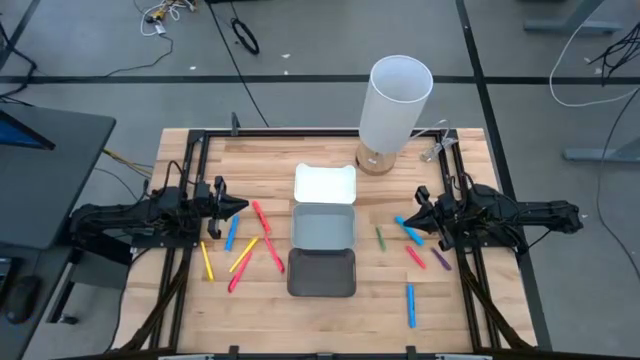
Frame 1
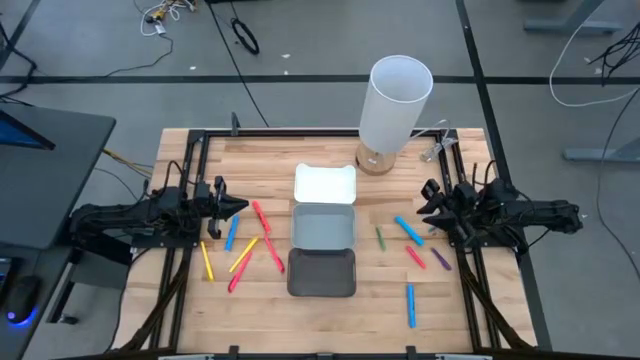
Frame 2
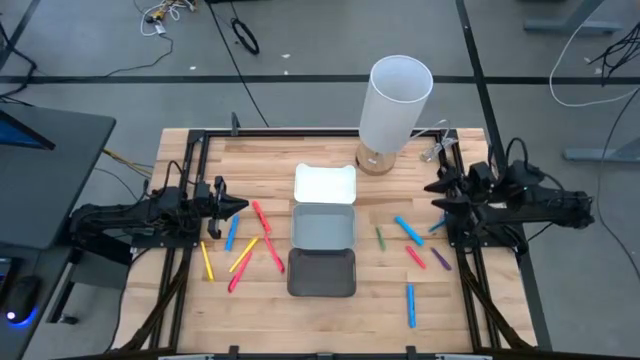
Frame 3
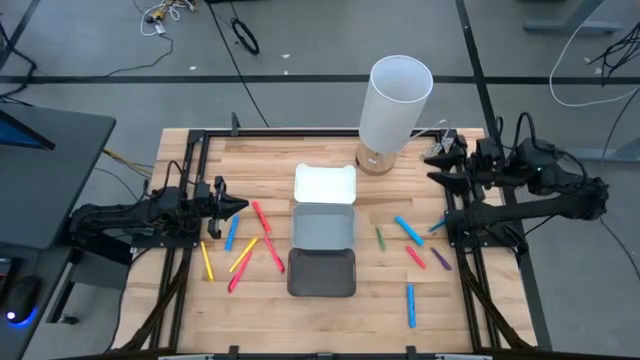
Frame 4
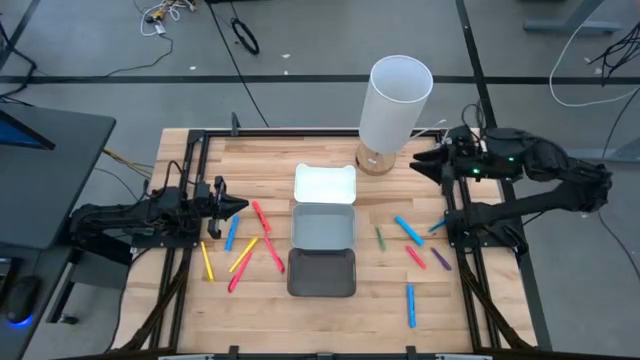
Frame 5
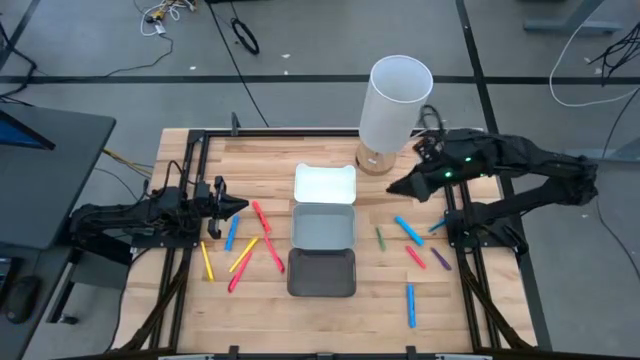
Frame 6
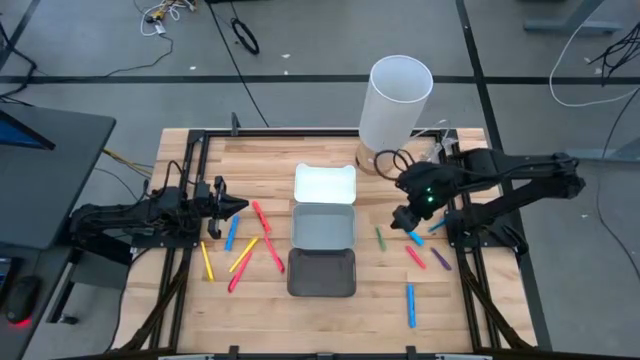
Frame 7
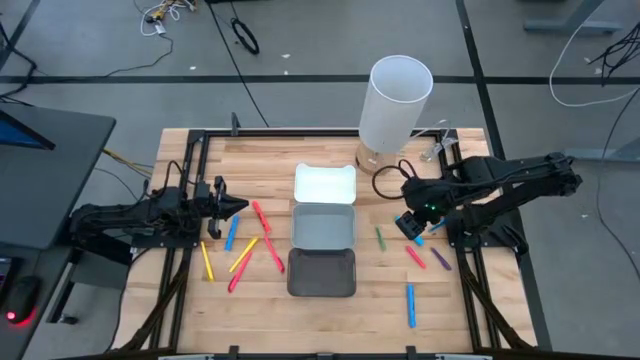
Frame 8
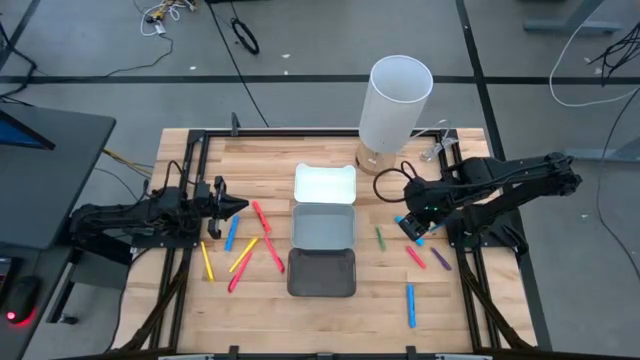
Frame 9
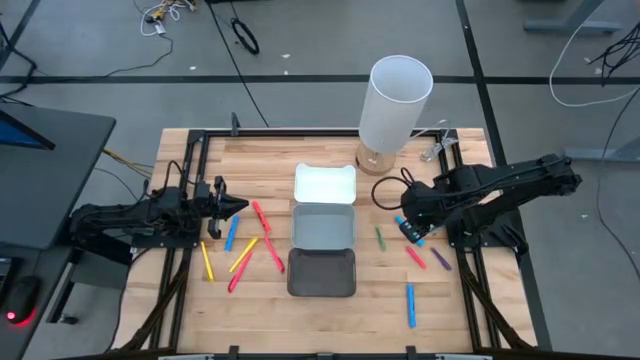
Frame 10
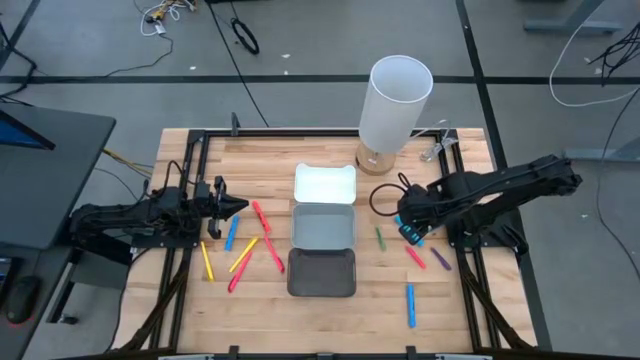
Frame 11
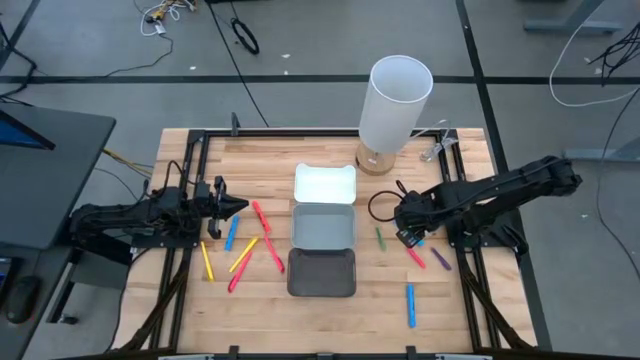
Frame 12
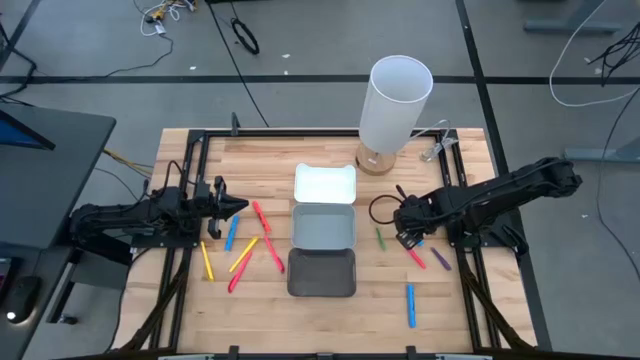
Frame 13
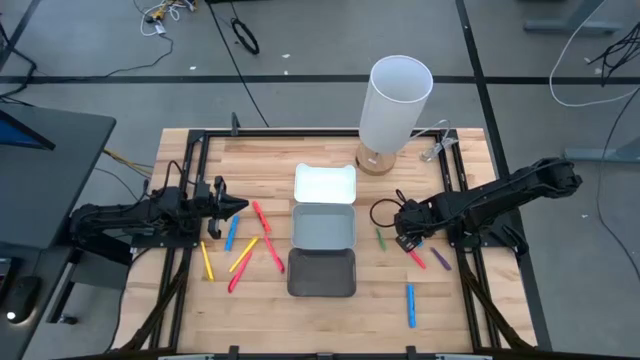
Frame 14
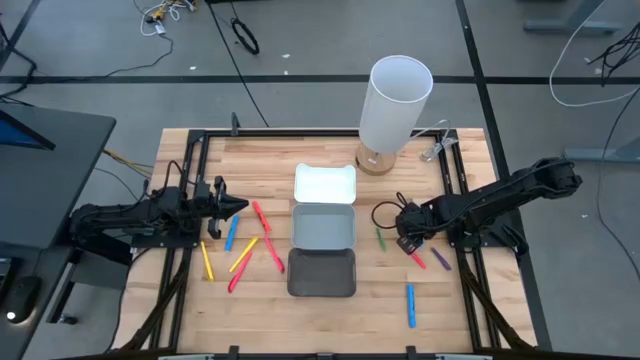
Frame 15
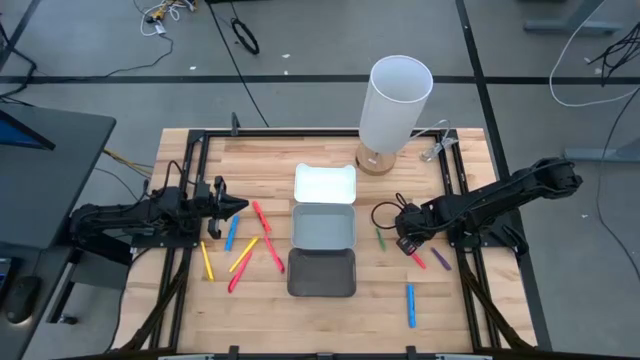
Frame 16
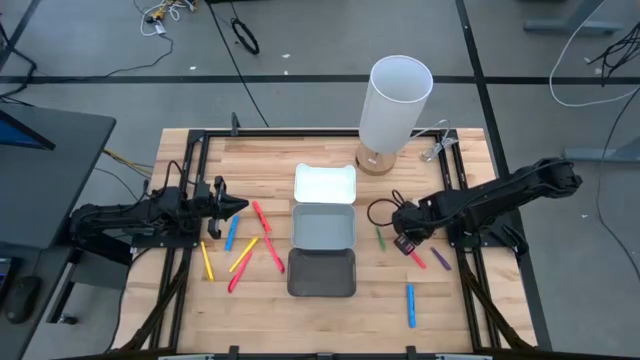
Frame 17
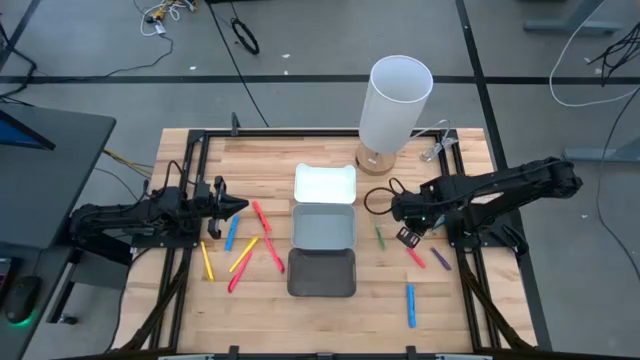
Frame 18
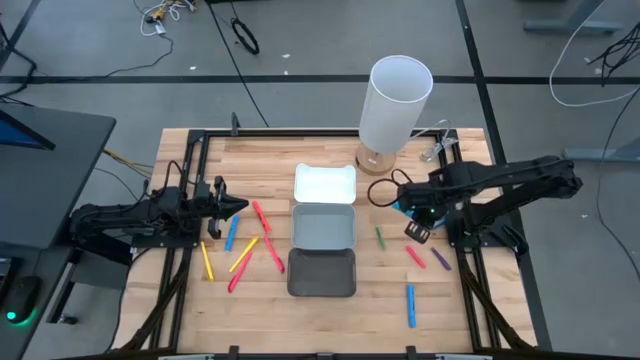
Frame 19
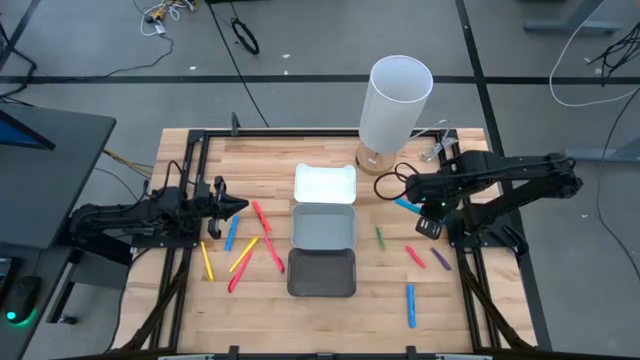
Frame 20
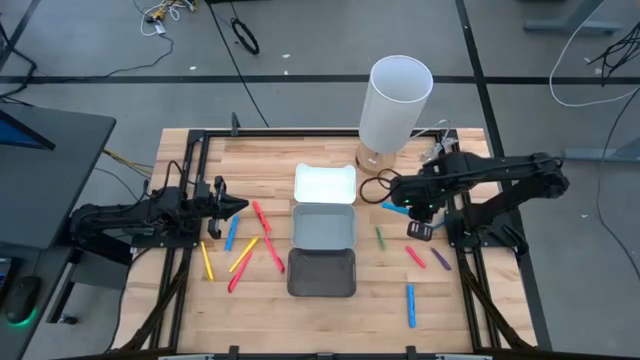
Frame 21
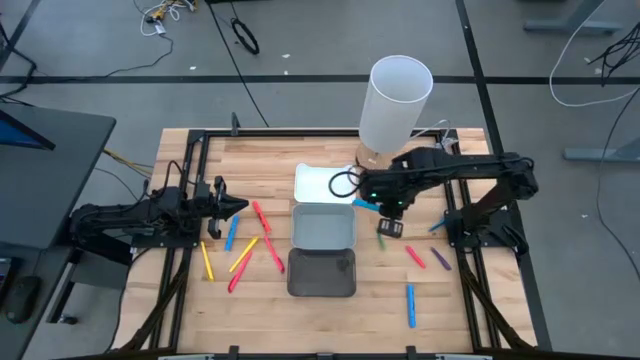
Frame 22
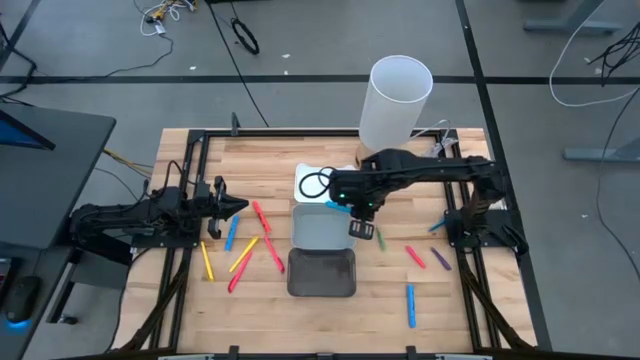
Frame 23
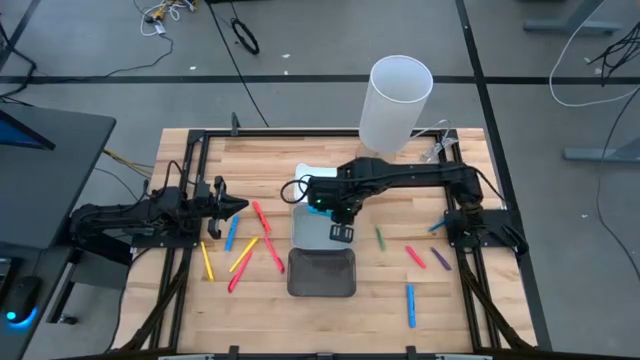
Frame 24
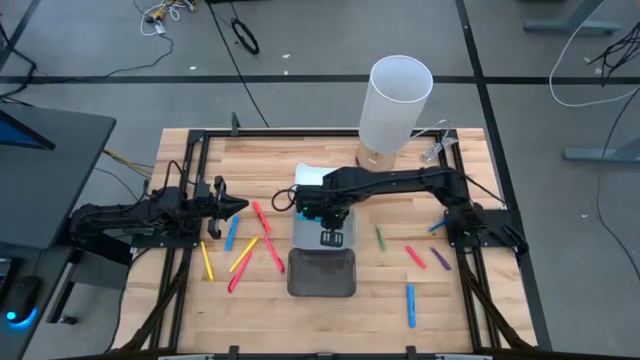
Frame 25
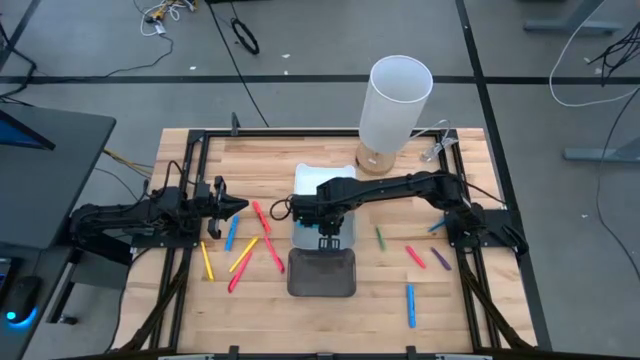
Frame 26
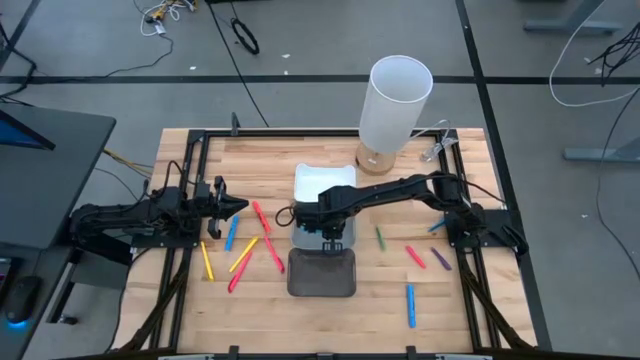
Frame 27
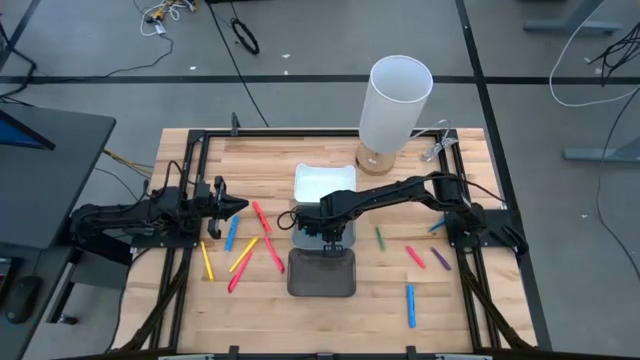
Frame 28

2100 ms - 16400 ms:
Task: Pick & Place Markers
Put the top right blue highlighter pen into the gray bin

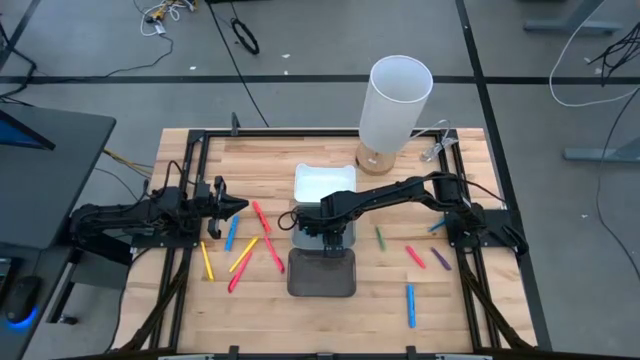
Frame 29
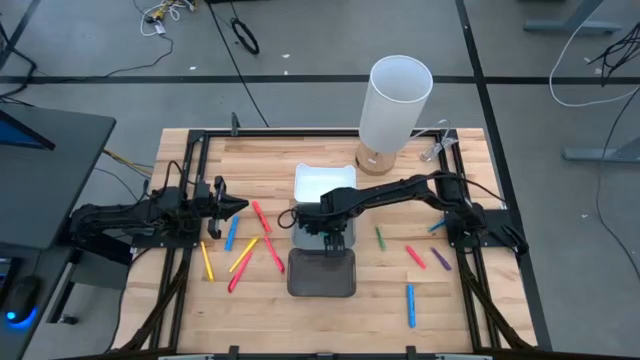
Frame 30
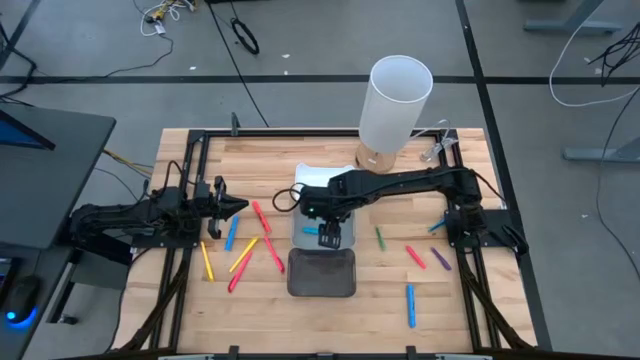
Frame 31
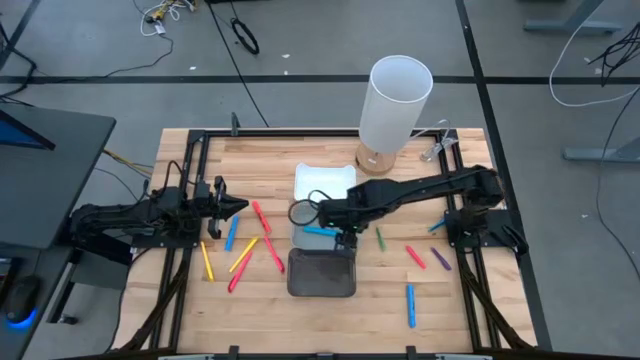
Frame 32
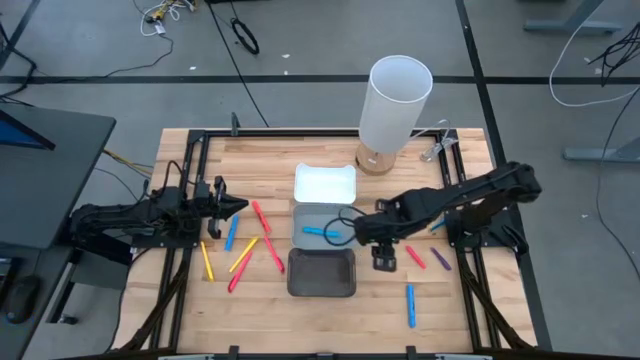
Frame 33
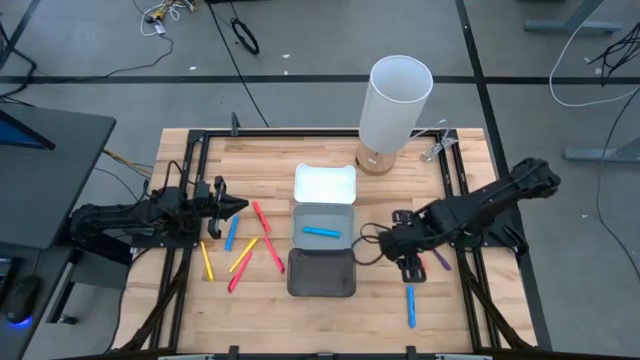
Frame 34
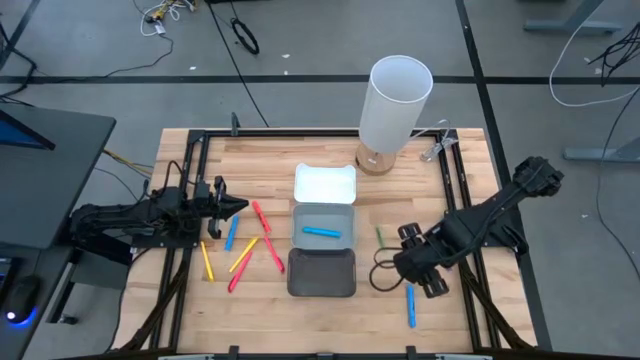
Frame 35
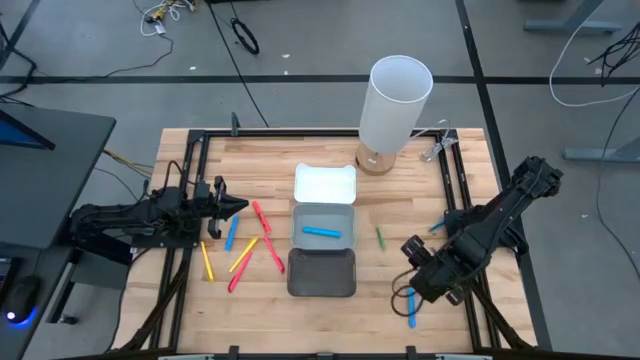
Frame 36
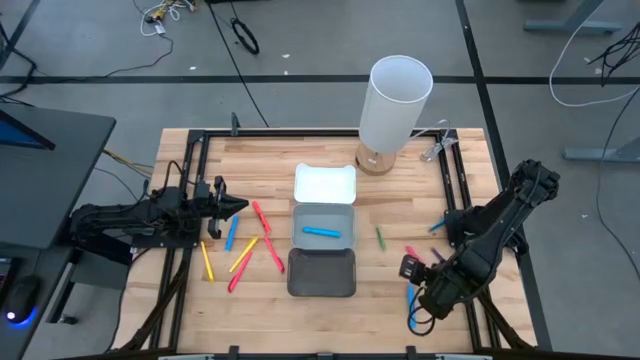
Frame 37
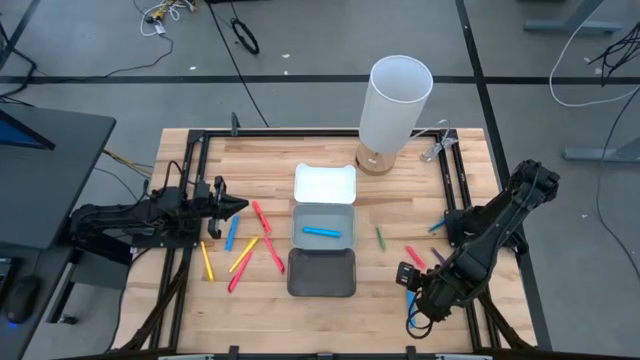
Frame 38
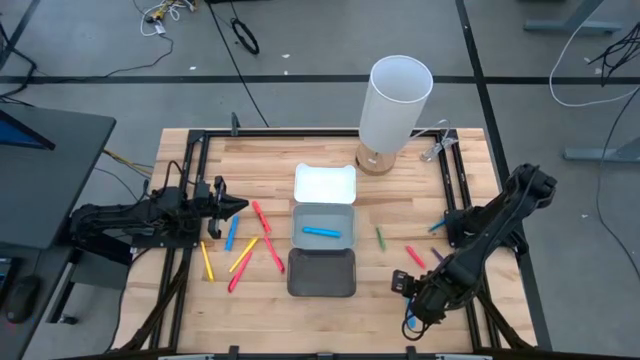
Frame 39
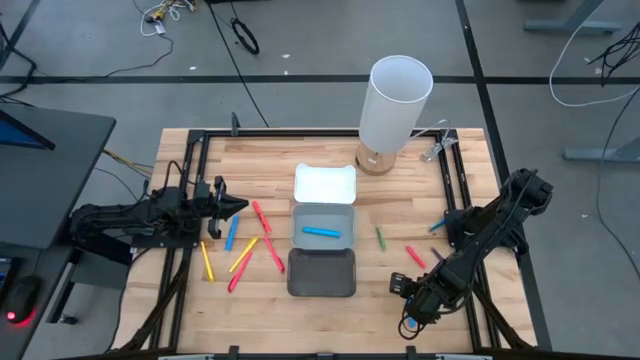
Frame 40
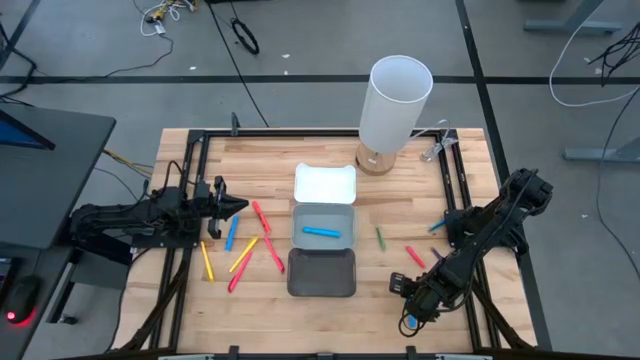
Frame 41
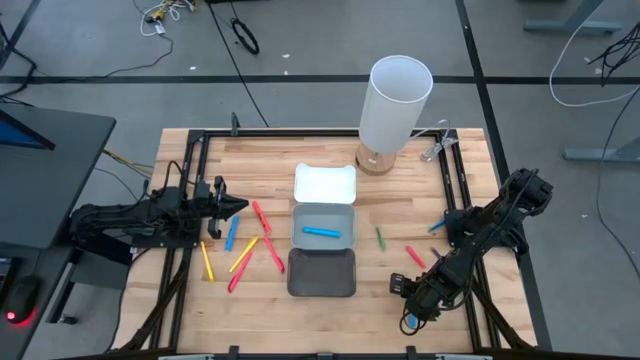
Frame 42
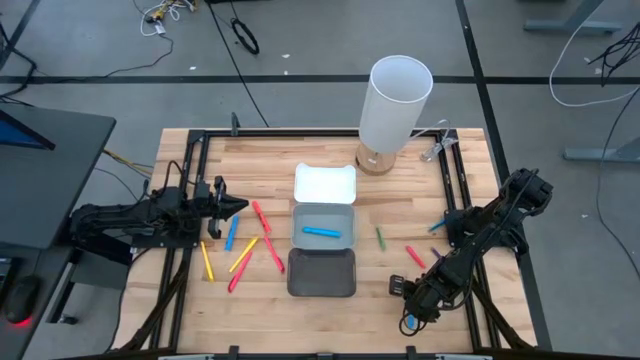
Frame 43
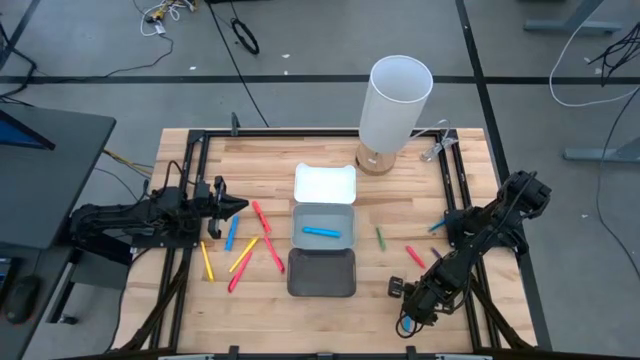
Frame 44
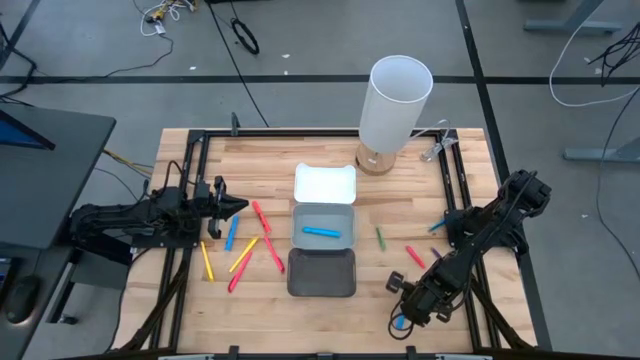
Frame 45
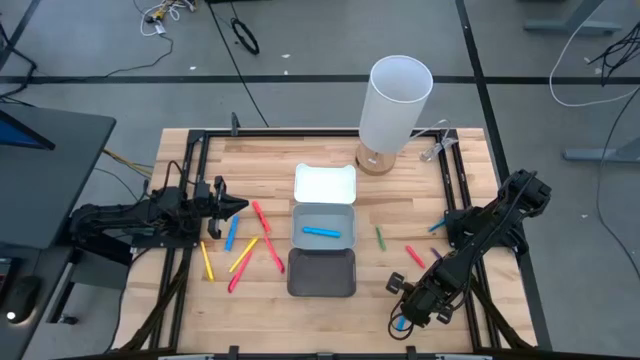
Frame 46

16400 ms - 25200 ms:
Put the light blue highlighter pen into the gray bin
